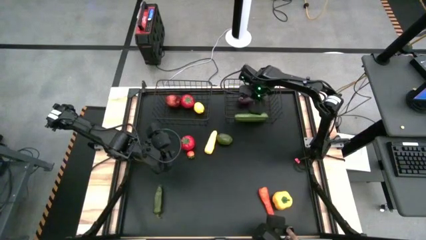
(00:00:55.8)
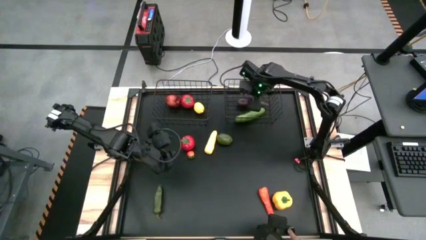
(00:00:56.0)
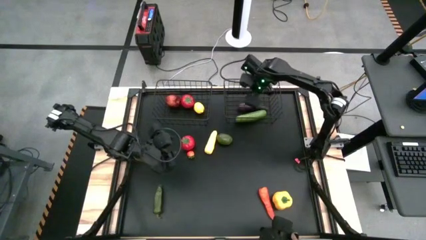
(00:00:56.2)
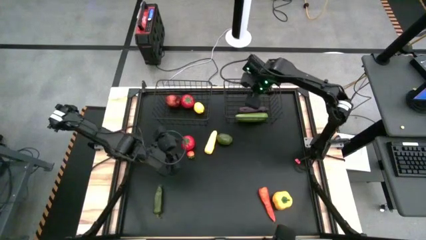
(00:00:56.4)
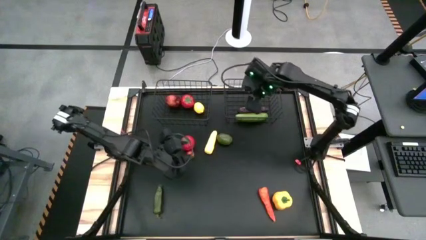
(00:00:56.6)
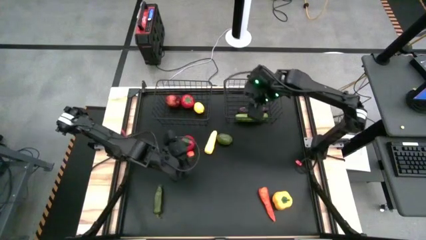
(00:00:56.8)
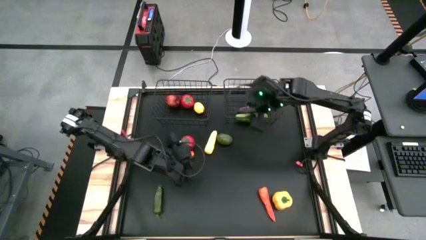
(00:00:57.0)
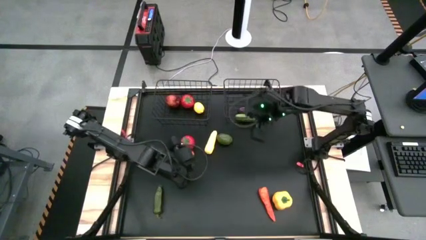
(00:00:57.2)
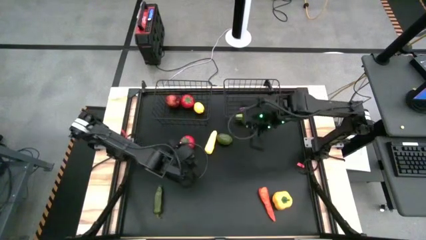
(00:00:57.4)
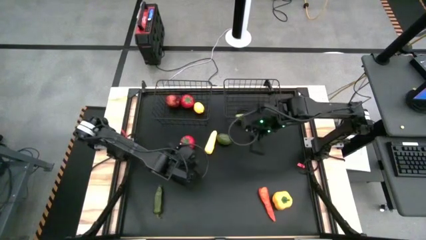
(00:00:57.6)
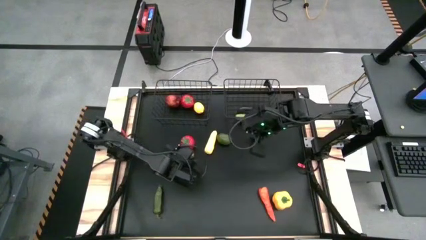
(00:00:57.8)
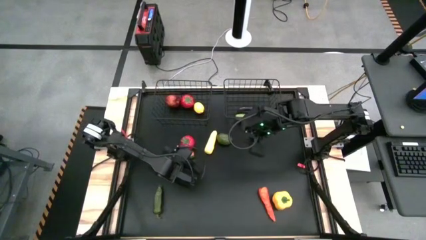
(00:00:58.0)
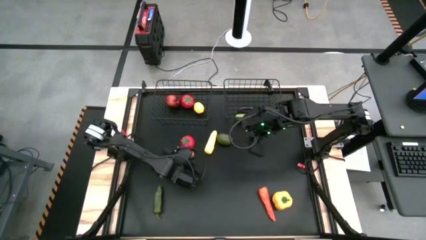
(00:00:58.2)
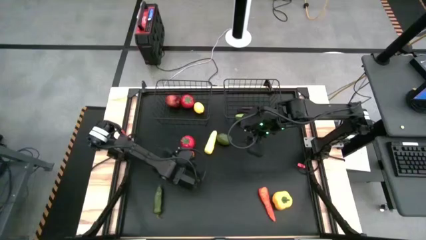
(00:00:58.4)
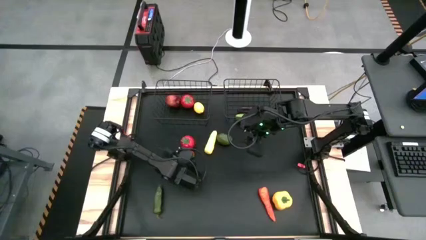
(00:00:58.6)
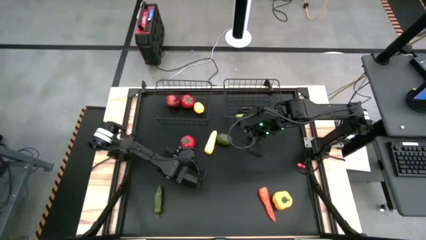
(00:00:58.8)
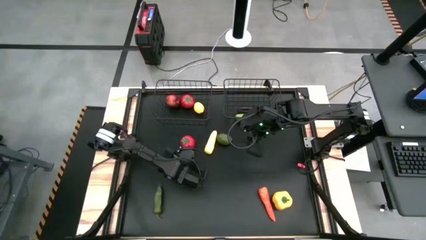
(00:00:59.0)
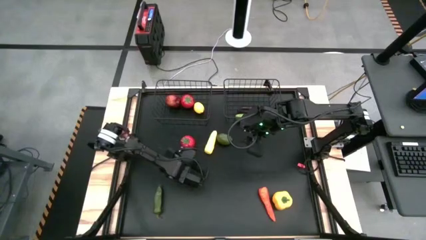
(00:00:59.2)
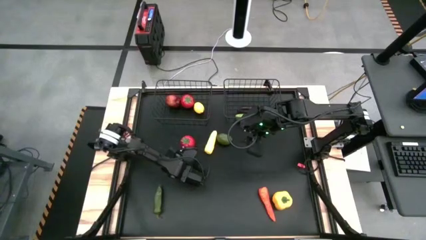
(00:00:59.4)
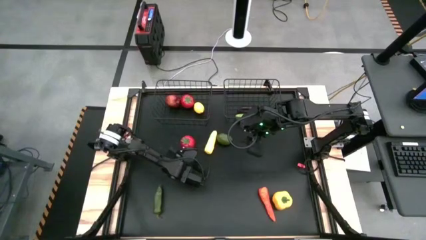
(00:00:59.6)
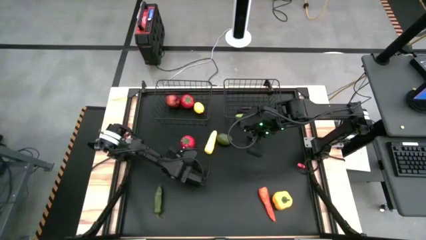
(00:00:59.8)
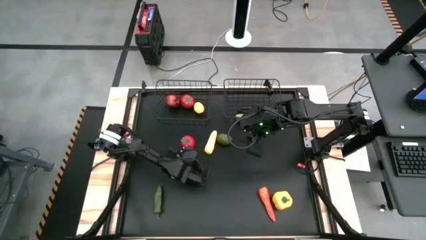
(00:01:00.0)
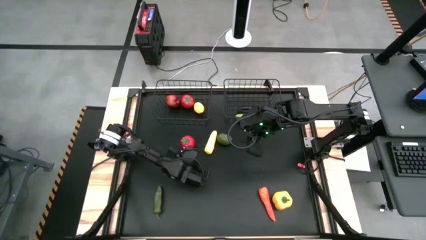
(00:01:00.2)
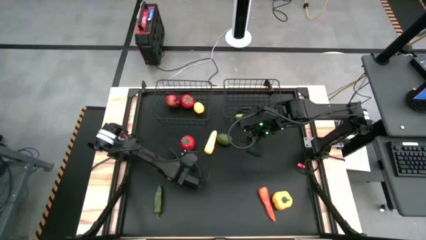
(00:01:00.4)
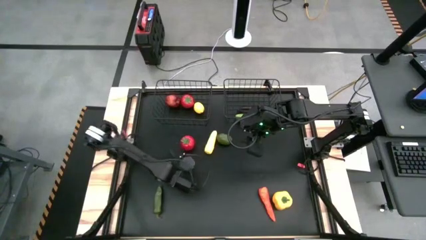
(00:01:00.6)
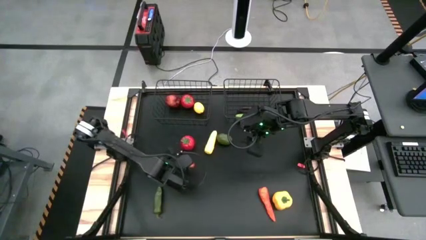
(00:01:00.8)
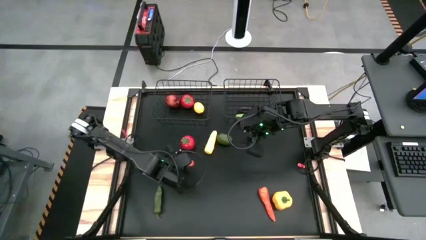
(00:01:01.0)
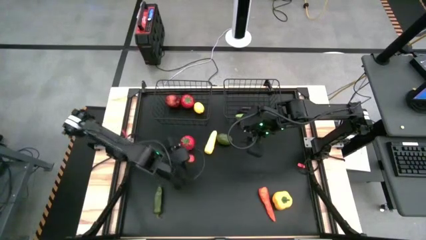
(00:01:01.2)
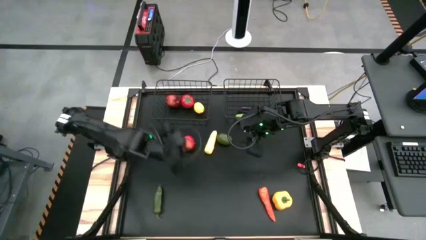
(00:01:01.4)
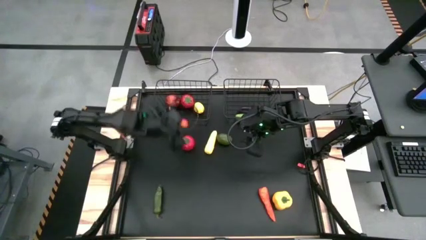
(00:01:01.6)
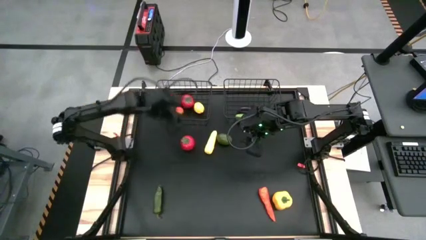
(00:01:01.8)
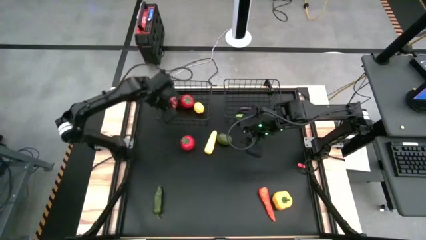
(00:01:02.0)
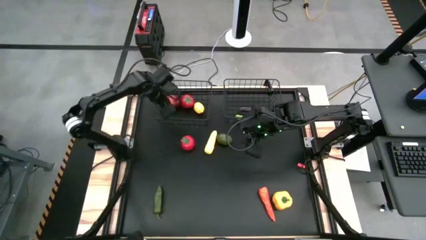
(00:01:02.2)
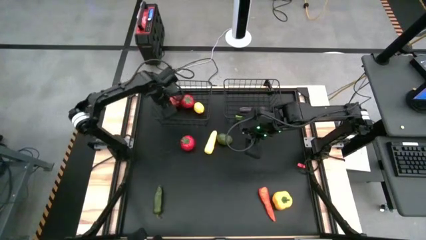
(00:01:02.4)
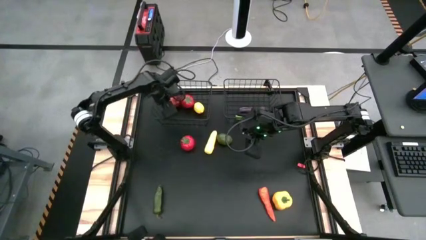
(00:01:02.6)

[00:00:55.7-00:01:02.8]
Task: Sort produce into baskets
Put the persimmon into the left wire basket

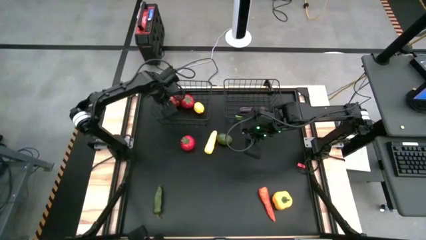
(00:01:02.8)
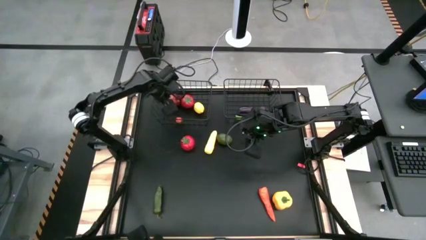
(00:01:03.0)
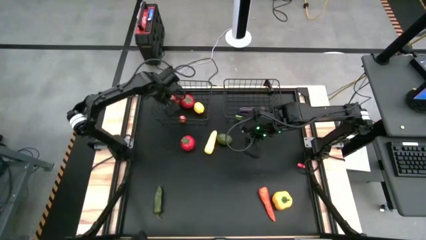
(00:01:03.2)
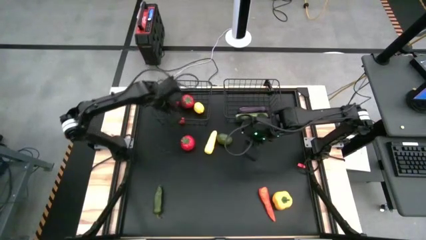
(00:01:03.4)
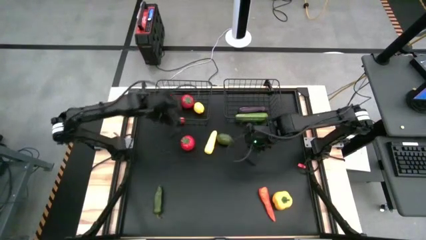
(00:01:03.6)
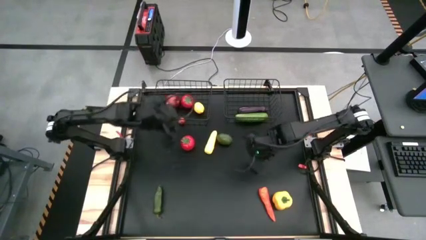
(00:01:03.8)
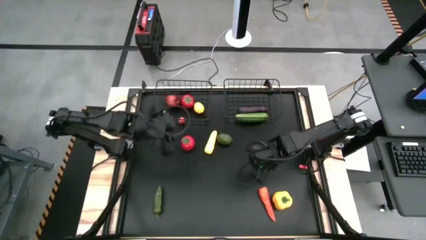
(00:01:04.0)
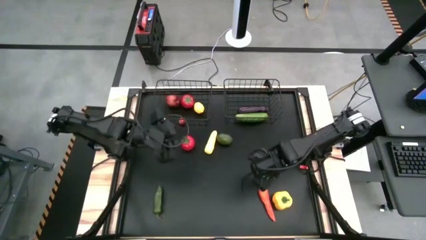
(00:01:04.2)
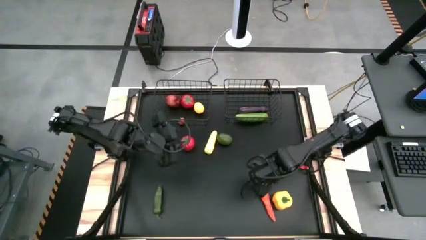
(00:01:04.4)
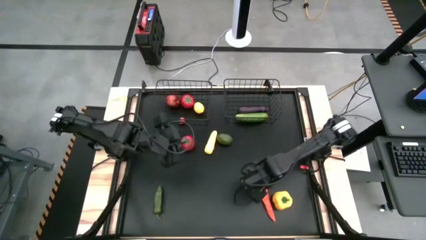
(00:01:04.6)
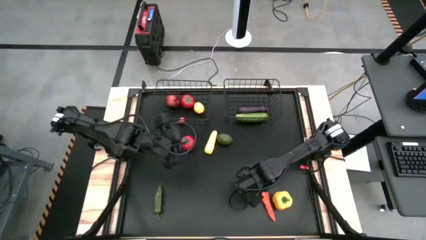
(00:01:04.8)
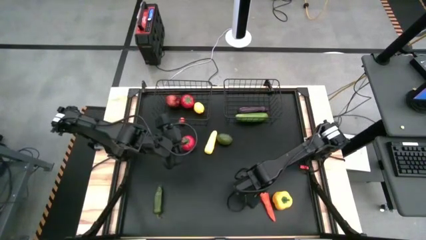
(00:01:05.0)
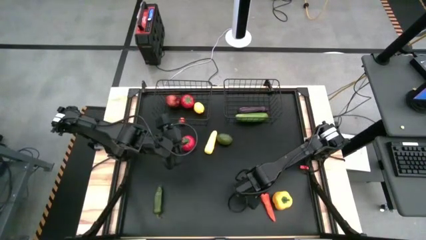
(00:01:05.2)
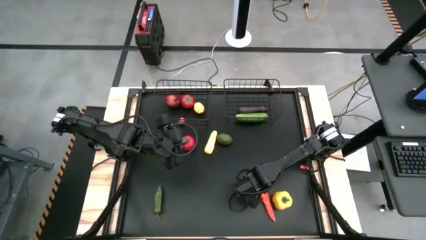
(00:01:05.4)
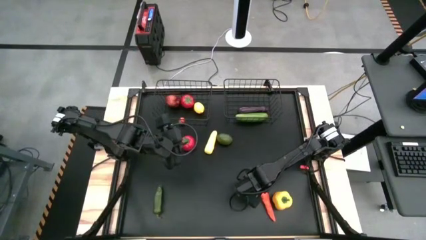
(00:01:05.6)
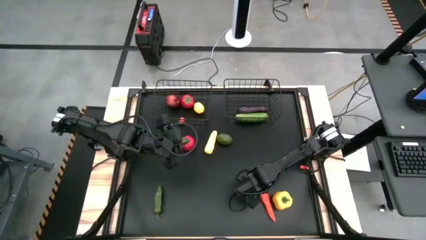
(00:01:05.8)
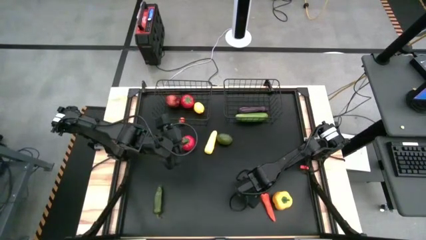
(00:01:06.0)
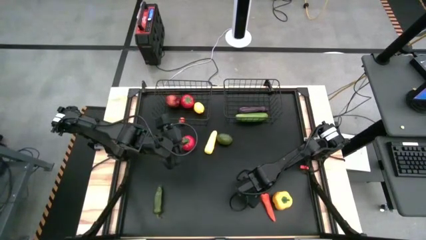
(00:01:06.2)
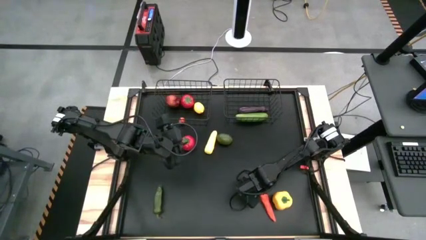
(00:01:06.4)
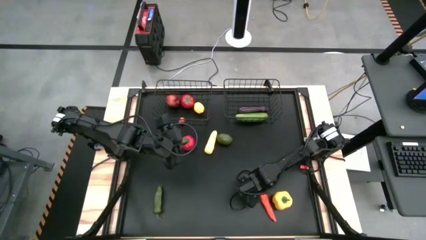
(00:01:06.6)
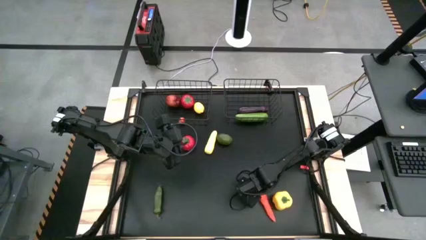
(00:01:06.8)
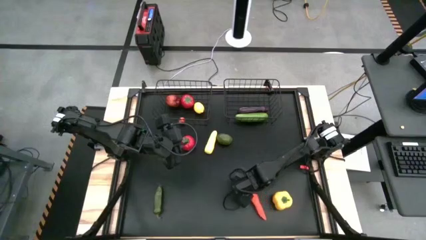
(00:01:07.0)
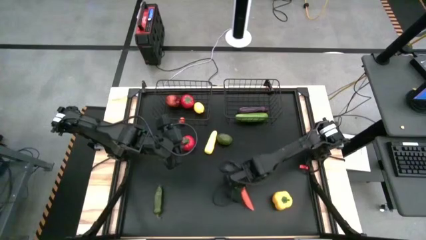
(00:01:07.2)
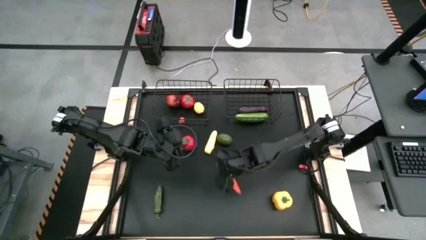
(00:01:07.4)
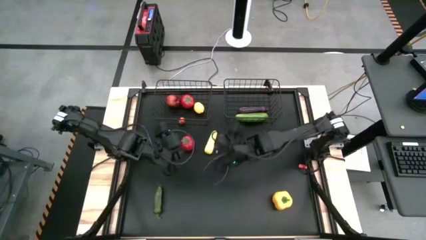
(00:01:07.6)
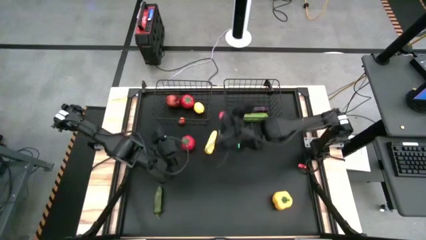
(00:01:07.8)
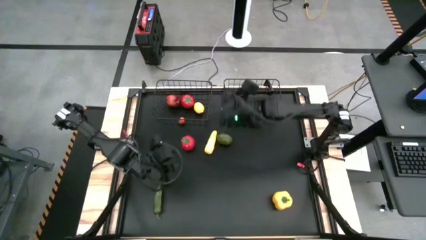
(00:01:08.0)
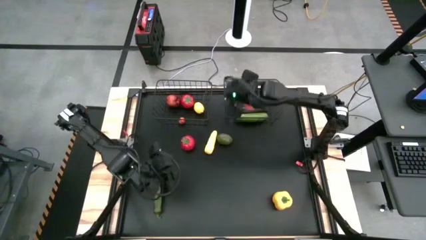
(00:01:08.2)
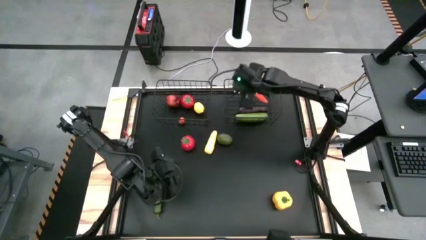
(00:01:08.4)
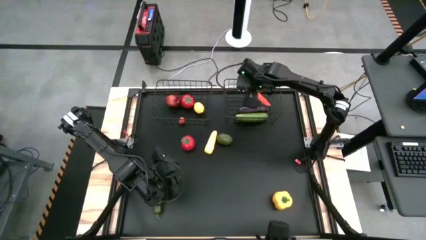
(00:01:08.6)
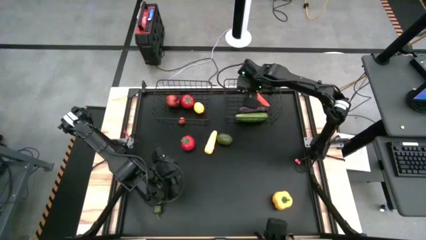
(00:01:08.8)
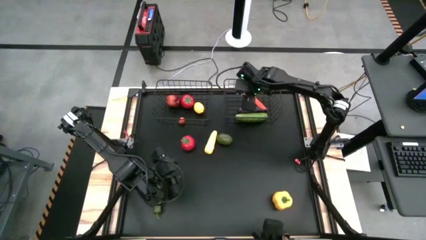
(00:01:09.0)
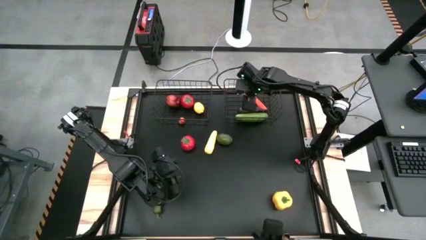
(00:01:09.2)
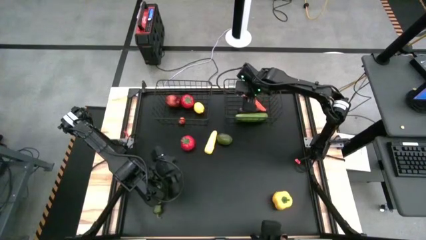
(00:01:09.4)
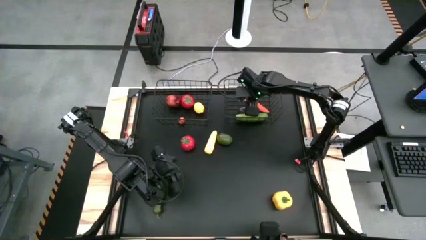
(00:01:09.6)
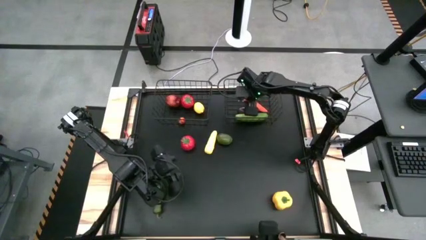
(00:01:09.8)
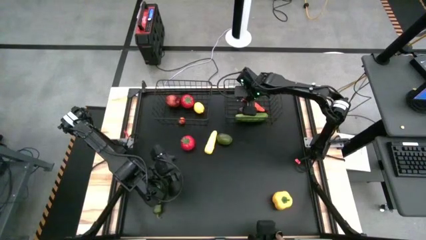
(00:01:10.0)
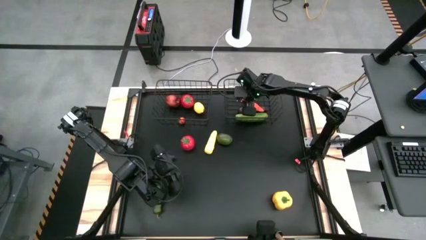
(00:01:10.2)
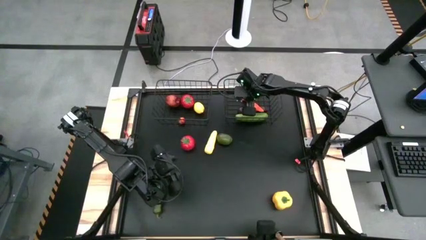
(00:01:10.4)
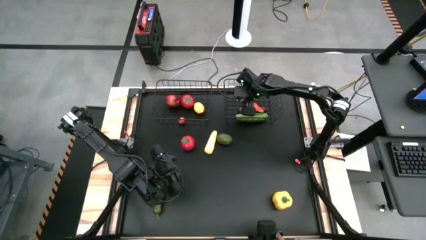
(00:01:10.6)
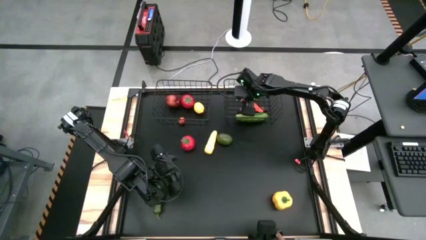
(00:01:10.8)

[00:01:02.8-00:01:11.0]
Put the carrot into the right wire basket
